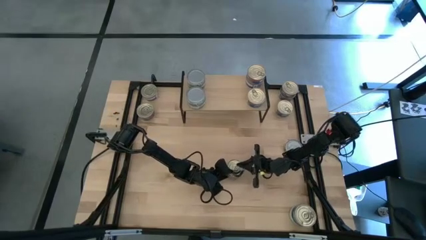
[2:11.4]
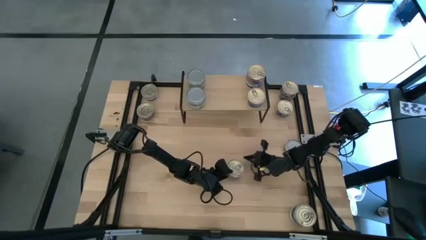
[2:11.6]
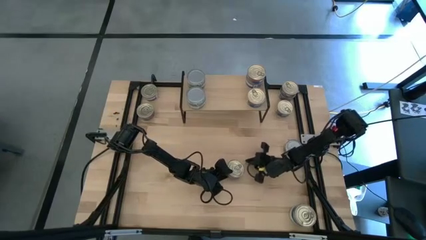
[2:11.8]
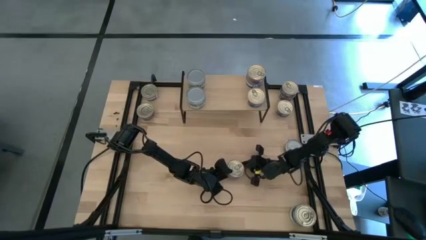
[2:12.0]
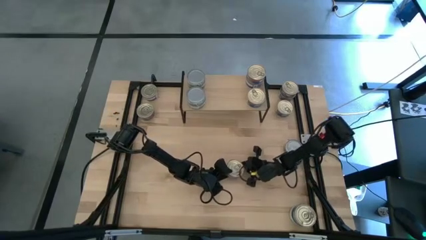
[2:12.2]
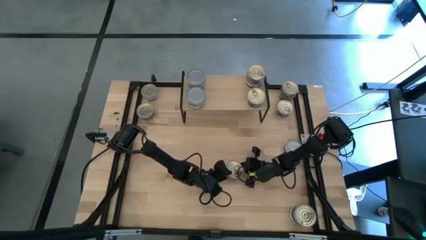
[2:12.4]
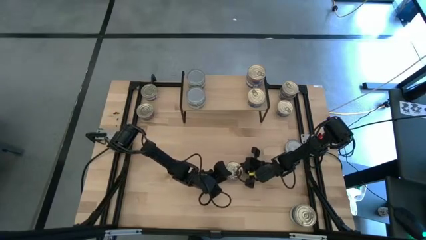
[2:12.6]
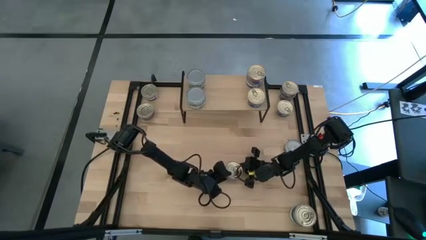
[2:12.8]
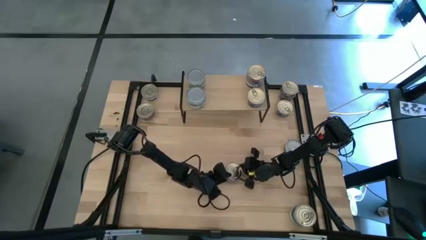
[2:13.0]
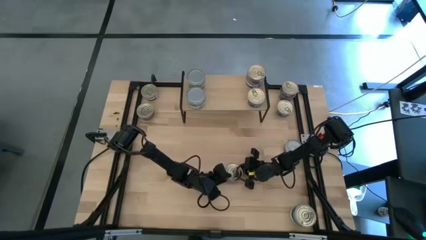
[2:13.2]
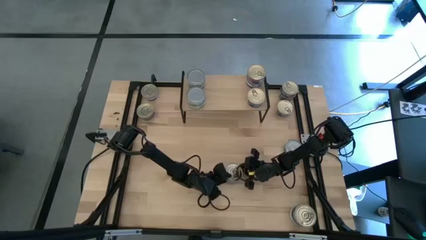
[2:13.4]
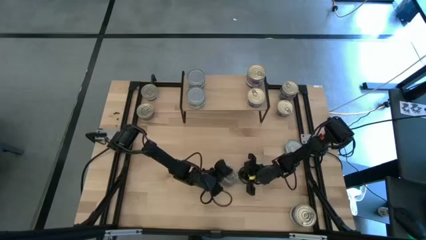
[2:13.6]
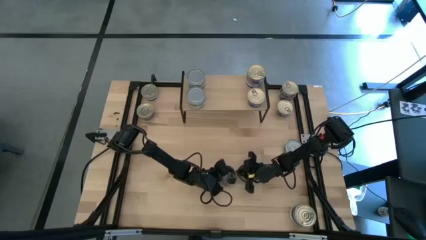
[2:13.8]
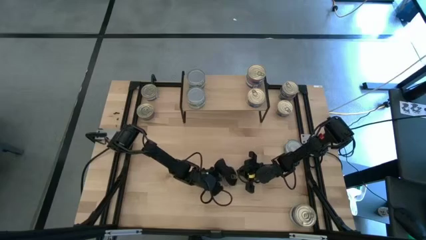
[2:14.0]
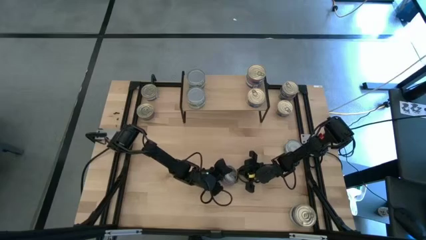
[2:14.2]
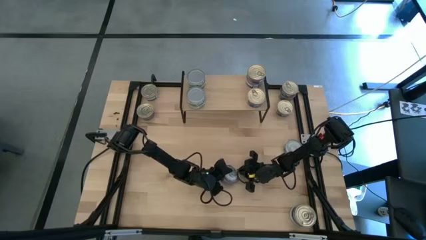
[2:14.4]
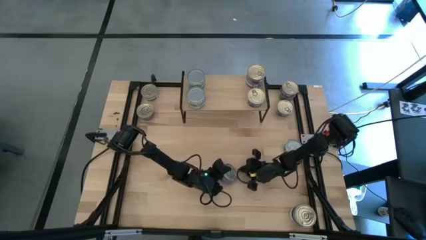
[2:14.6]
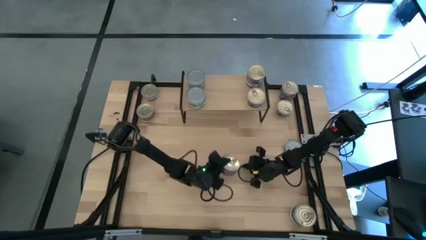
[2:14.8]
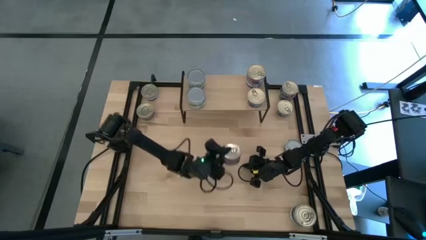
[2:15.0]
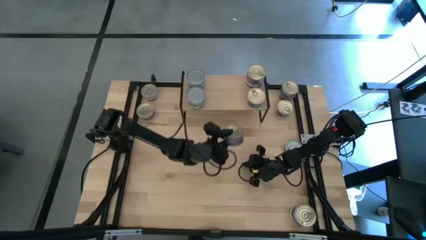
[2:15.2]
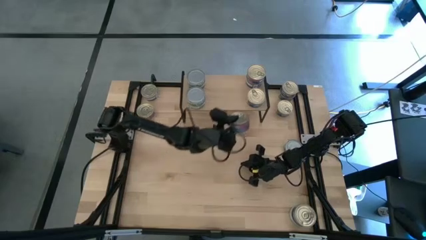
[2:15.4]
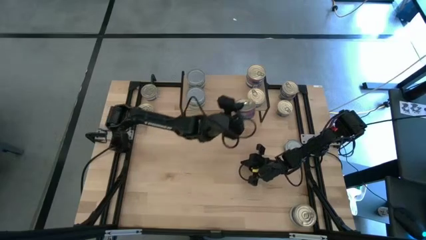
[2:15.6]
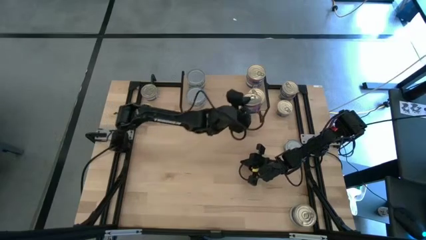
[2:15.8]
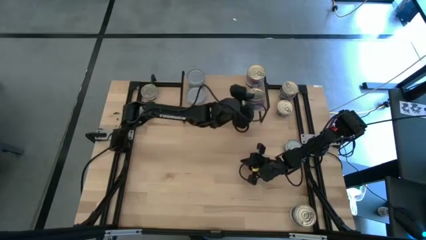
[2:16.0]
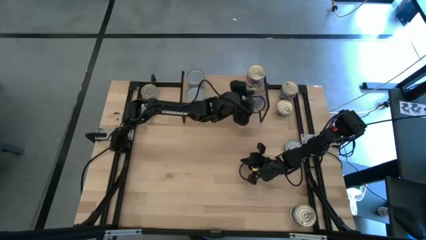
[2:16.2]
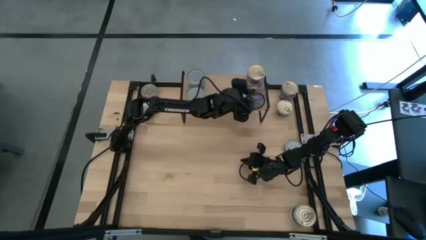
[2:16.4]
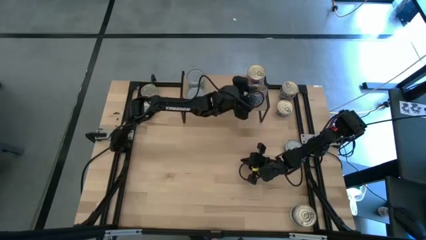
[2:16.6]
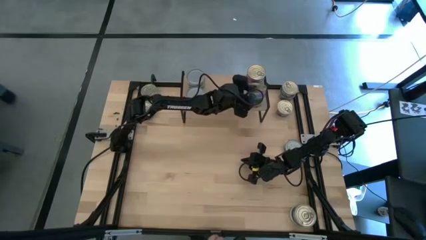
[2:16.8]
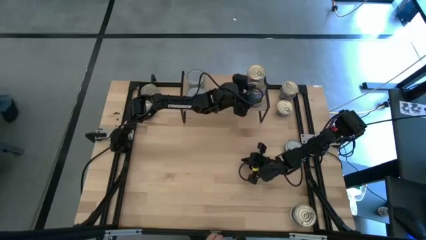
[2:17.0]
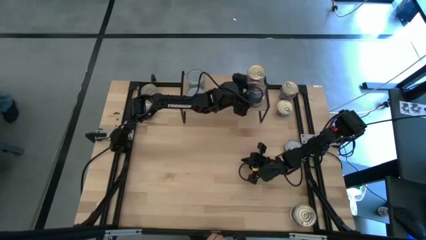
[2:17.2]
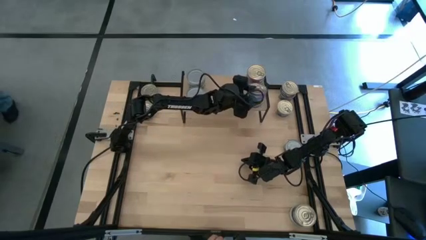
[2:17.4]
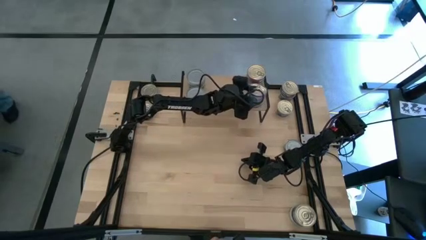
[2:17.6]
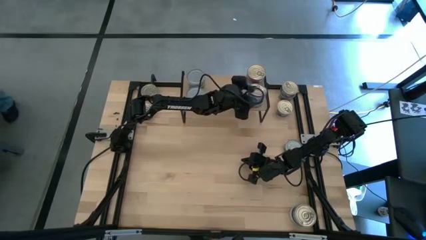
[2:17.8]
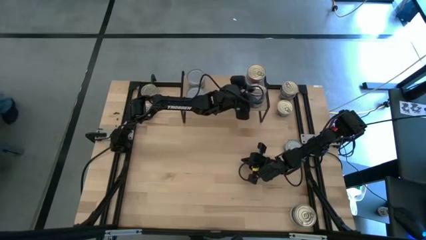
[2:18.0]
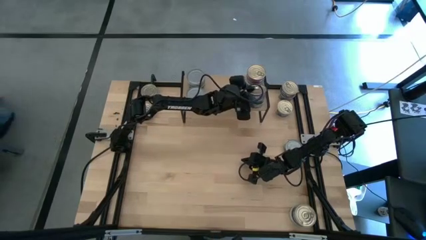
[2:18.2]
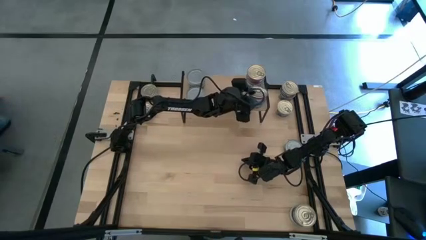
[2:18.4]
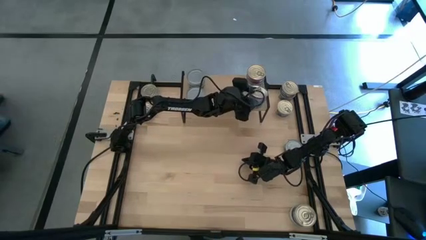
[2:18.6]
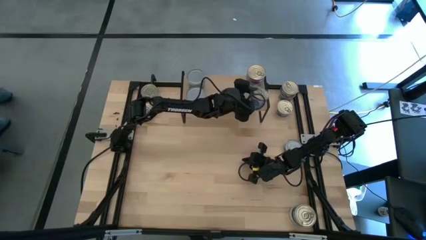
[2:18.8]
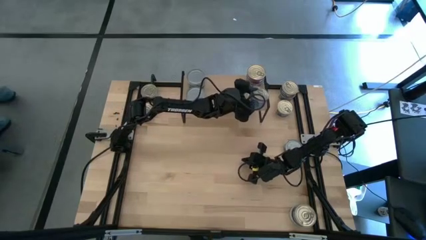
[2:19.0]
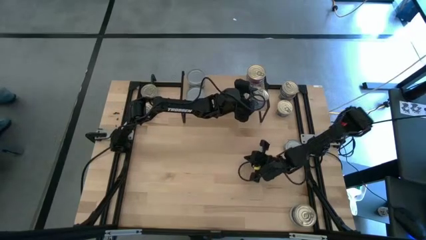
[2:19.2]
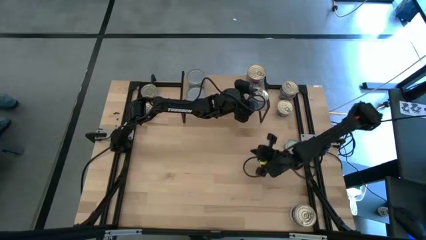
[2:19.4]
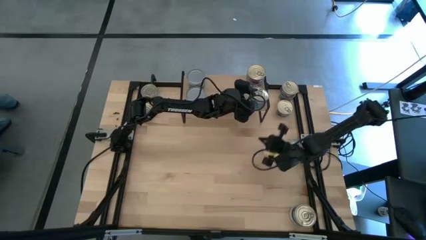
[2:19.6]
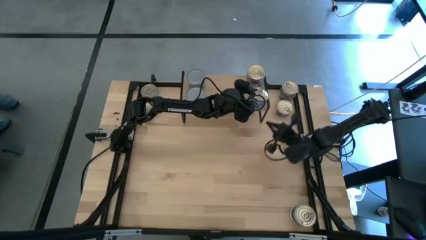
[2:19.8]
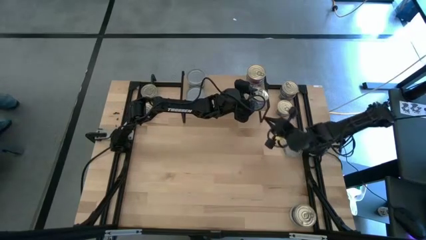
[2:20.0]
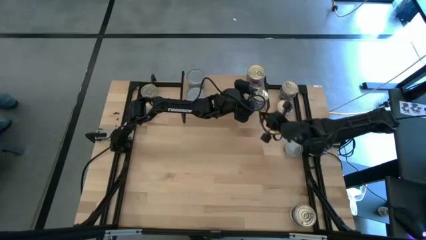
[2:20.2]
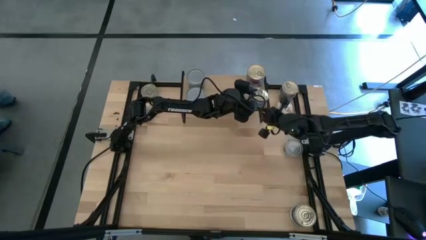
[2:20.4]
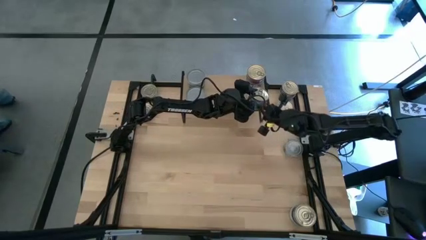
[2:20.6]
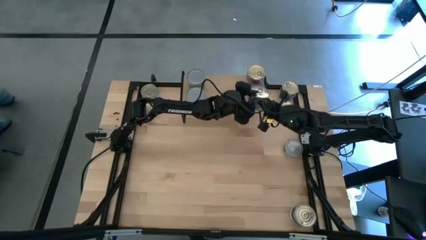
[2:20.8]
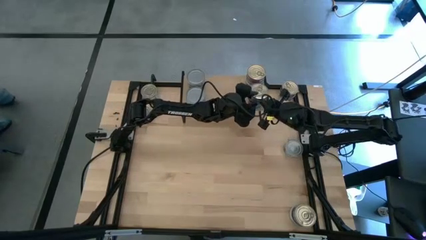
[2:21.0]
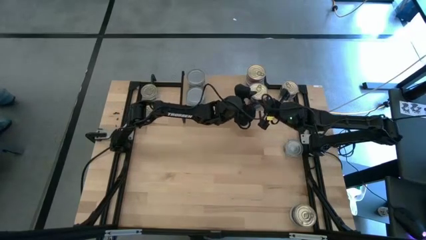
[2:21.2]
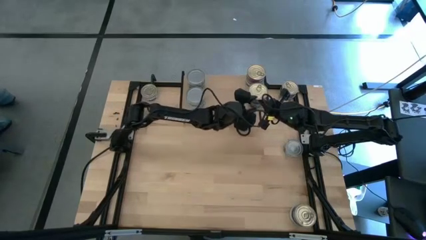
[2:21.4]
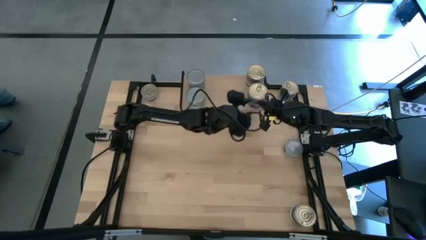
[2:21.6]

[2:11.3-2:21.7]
Task: Stack canned seafood by type on shelf
Stack the blue pink tuna can on top of the blue pink tuna can on the shelf

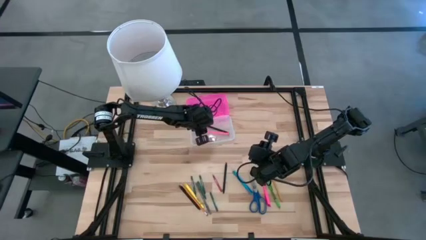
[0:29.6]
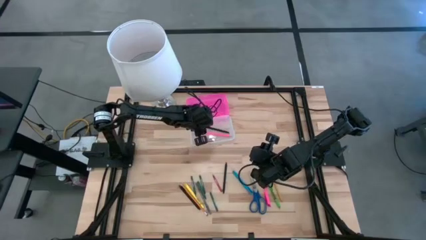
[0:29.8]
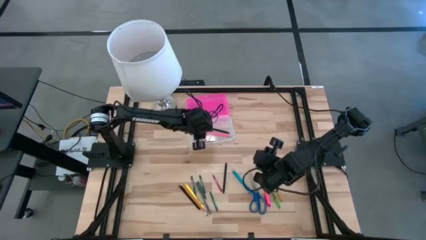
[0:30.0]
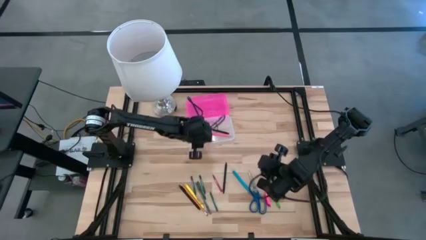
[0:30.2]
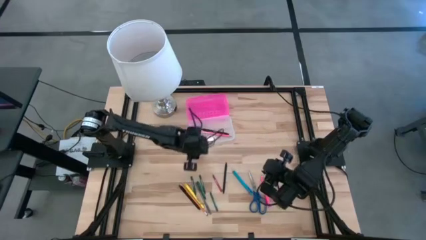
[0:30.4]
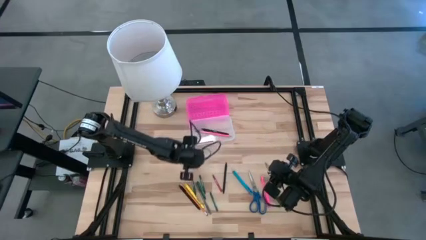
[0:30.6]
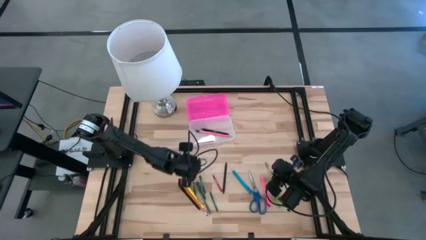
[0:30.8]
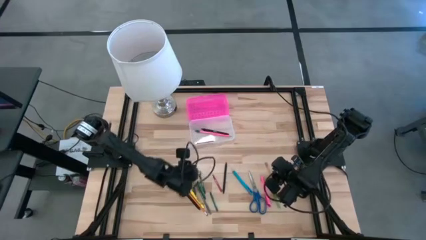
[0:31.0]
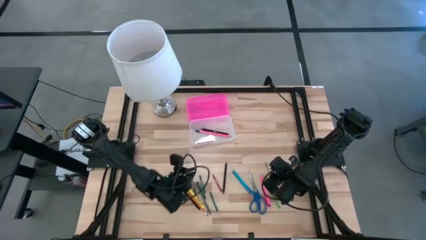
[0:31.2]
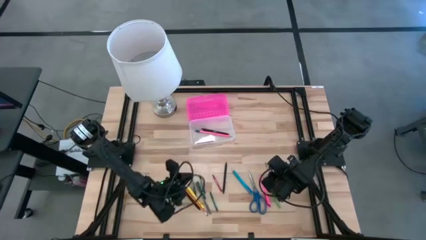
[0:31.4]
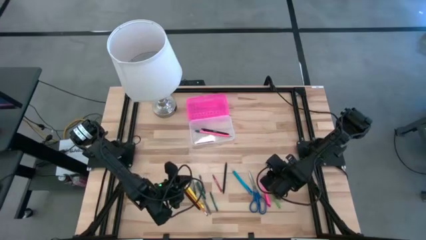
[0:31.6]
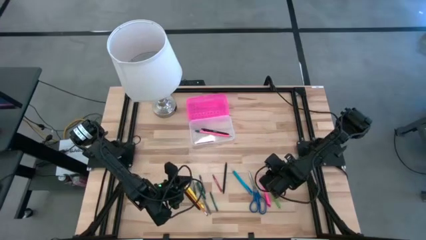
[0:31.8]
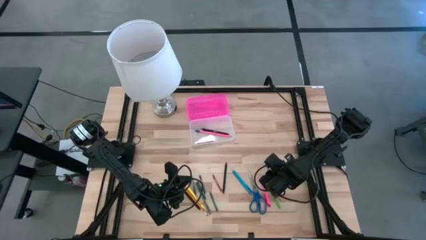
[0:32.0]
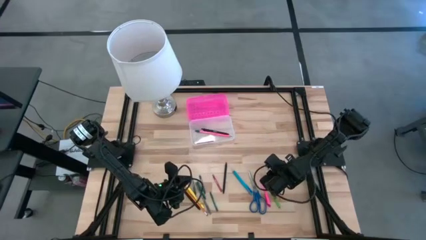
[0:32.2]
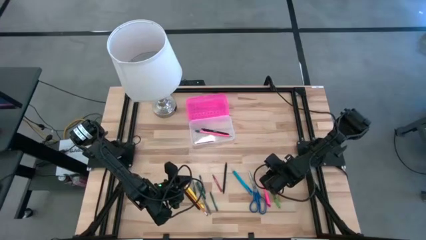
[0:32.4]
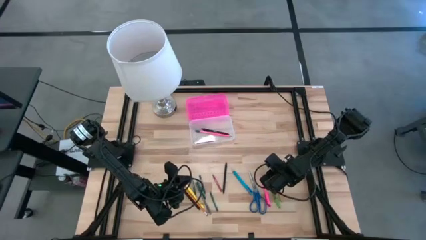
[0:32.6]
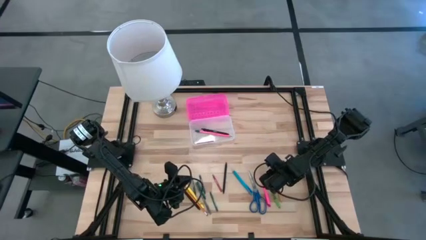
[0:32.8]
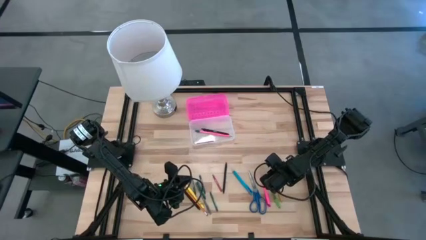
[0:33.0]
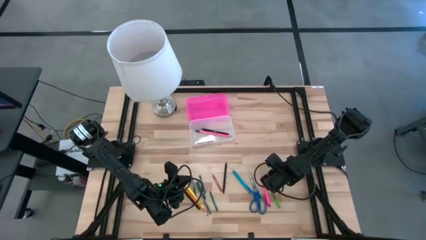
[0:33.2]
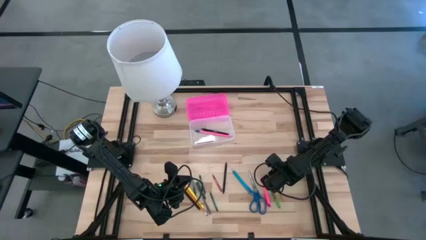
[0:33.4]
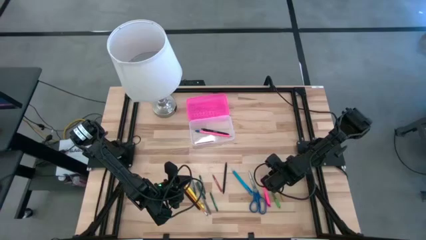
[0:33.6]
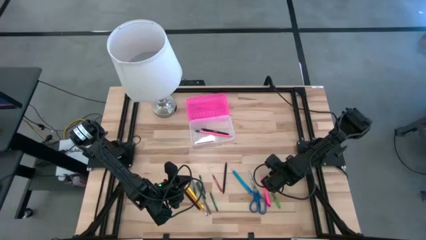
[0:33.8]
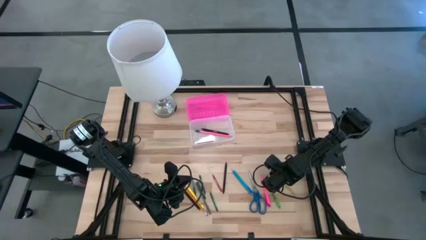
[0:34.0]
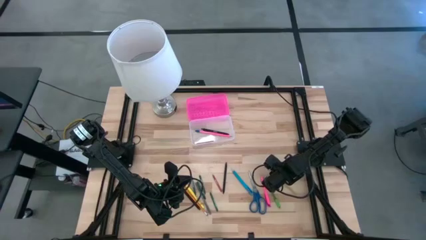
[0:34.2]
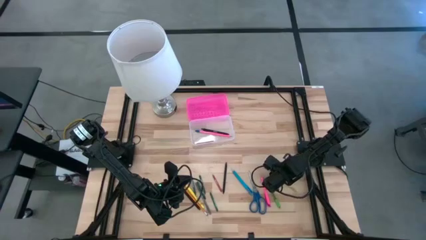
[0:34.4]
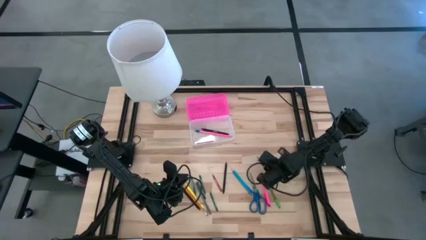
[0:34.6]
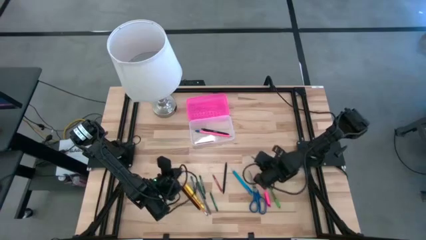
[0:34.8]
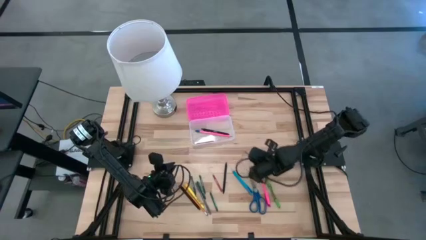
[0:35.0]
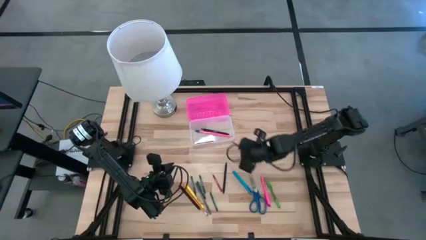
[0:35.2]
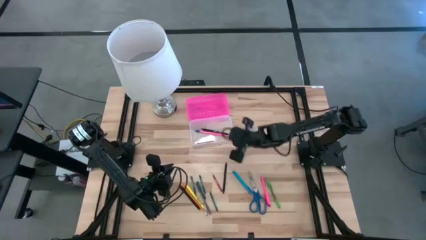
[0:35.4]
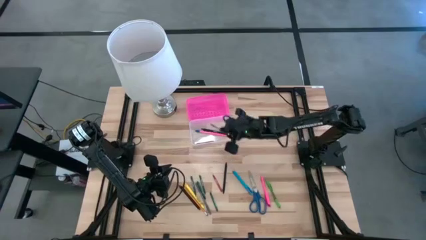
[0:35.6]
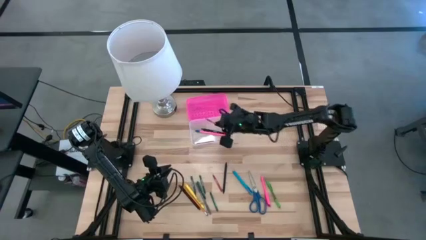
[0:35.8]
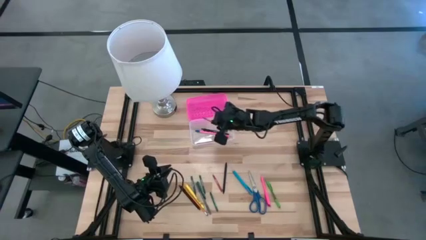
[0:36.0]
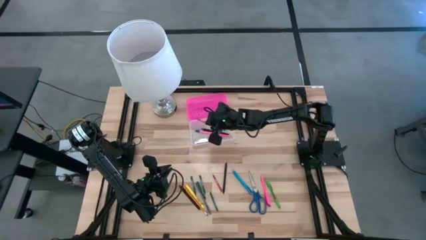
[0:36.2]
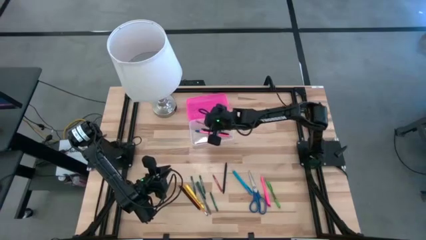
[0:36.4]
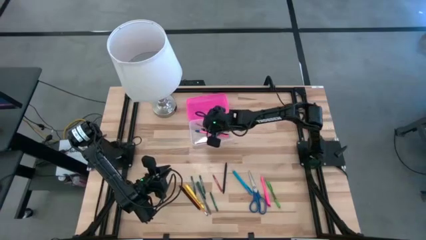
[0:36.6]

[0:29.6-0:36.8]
Task: Pick & place school supplies into a supply box
Put the orange pencil into the pink supply box
